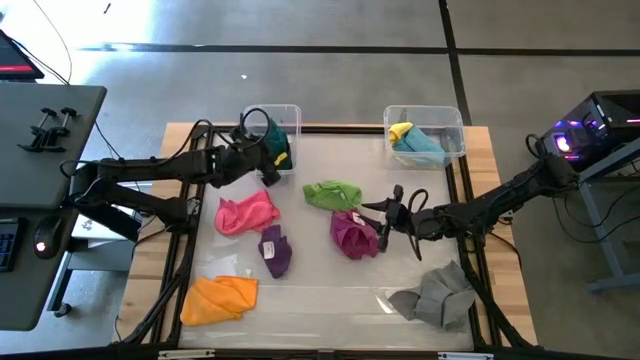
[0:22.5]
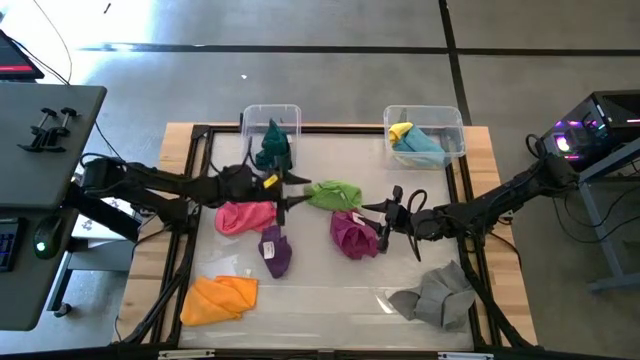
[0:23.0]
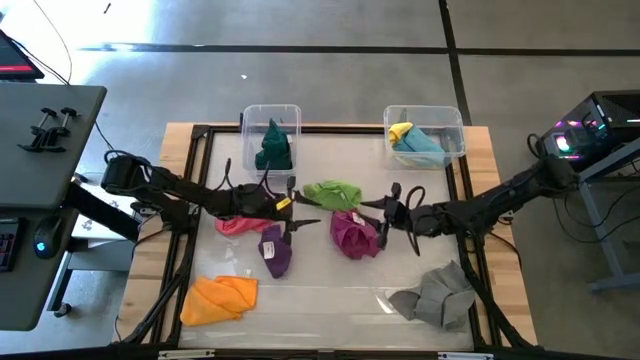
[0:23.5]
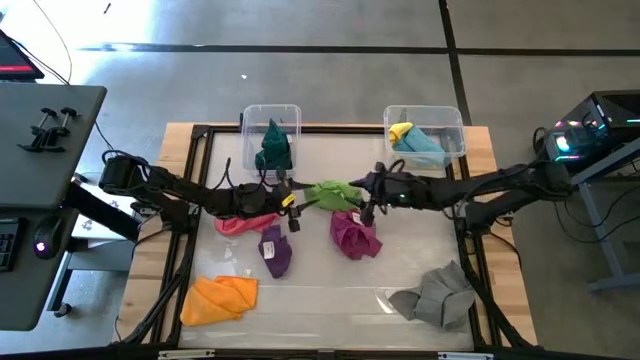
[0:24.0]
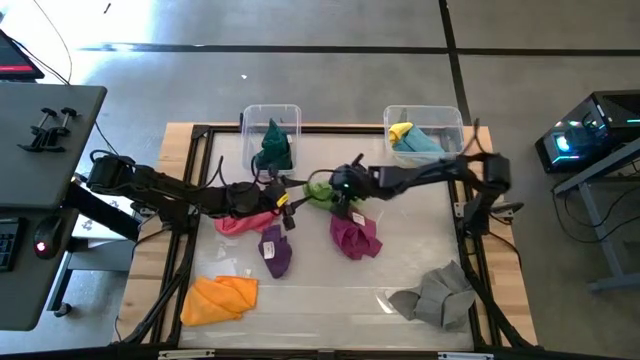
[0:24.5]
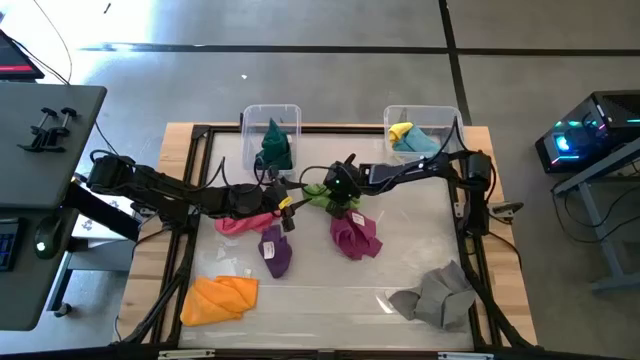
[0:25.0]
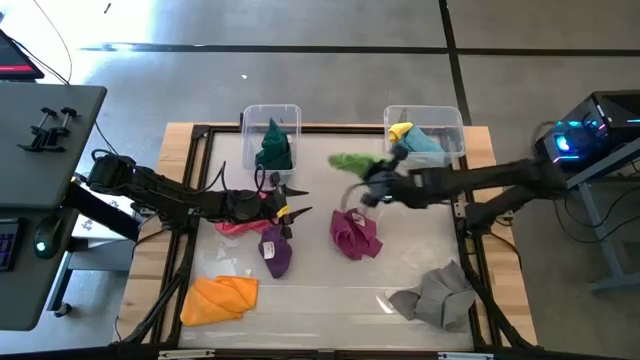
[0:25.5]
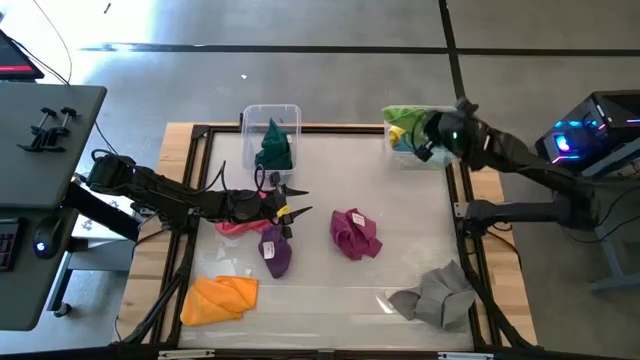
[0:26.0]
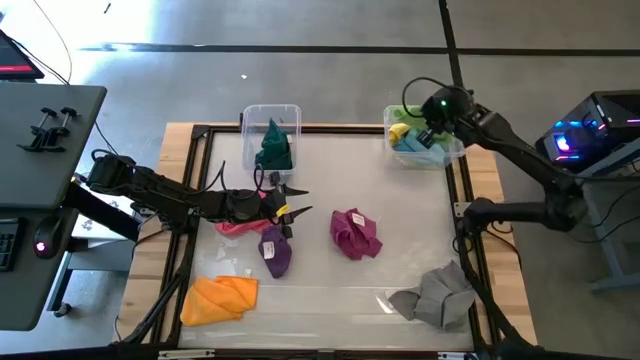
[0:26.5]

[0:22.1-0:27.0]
Task: Sort towels by color in basket
Put the light green towel into the right transparent bin

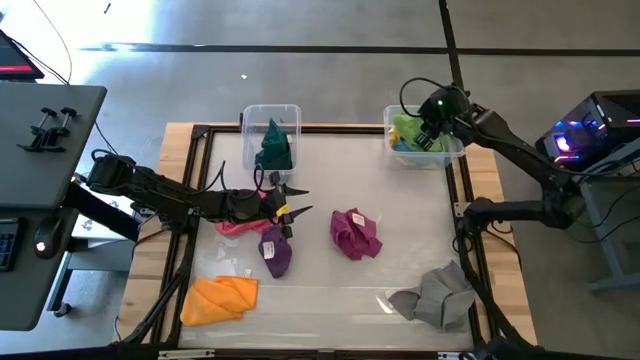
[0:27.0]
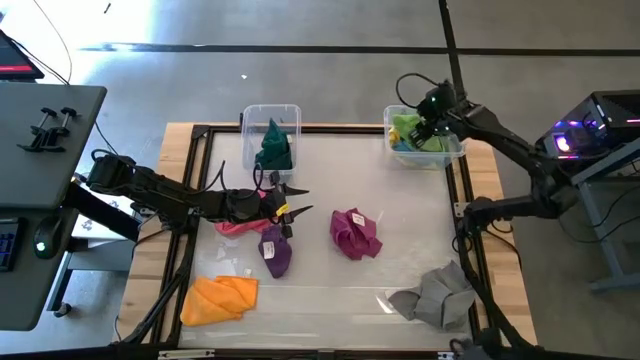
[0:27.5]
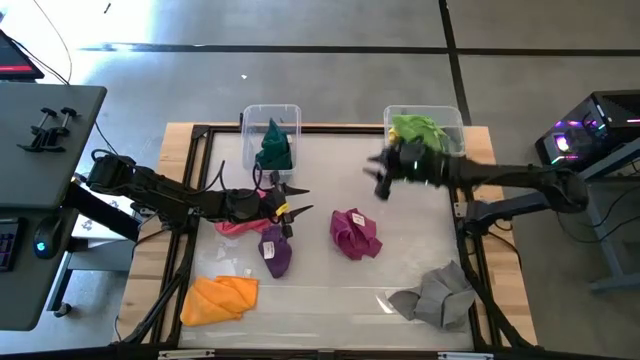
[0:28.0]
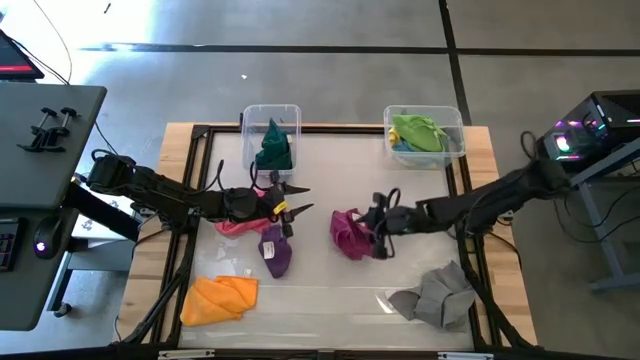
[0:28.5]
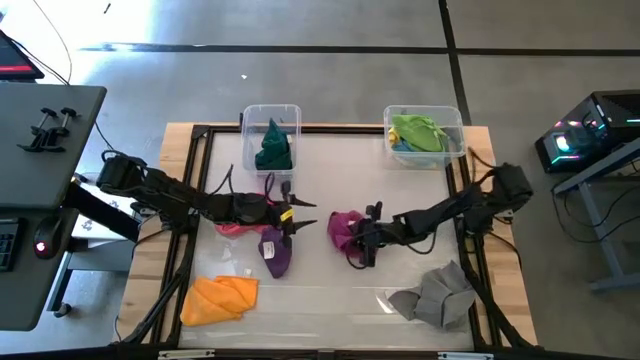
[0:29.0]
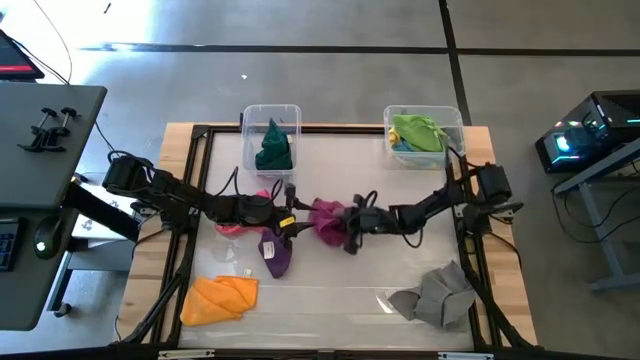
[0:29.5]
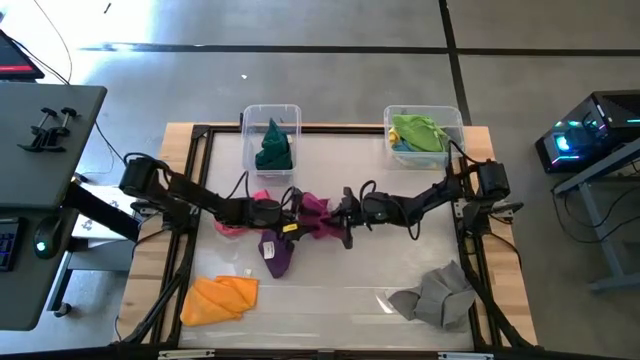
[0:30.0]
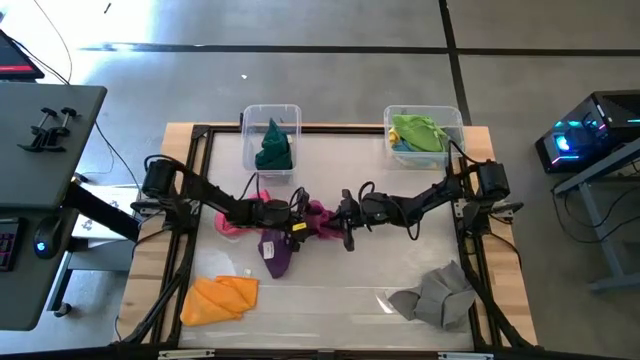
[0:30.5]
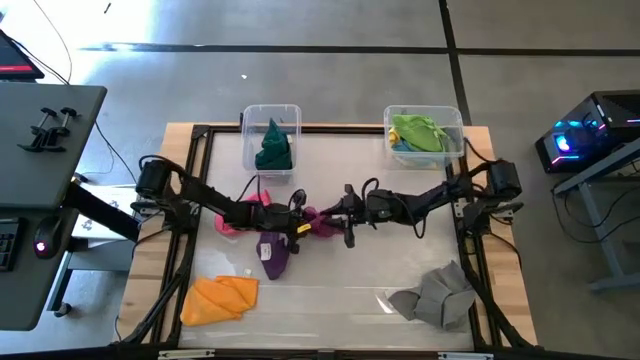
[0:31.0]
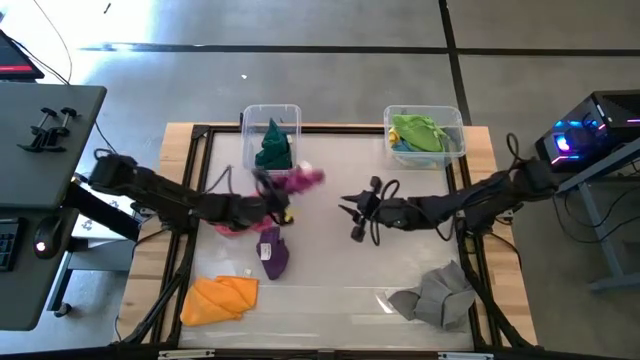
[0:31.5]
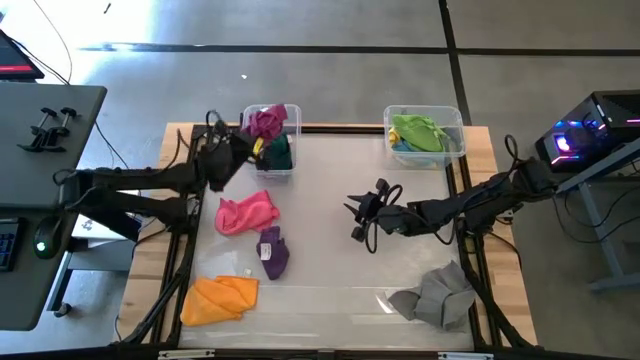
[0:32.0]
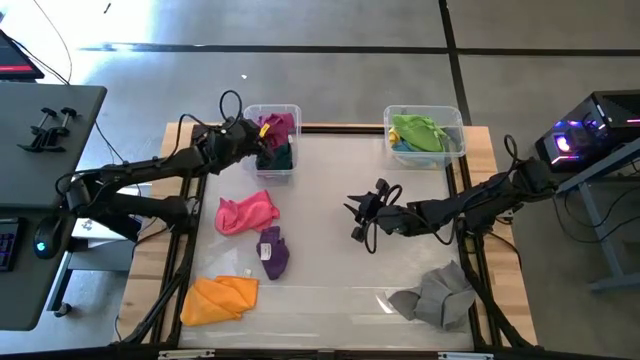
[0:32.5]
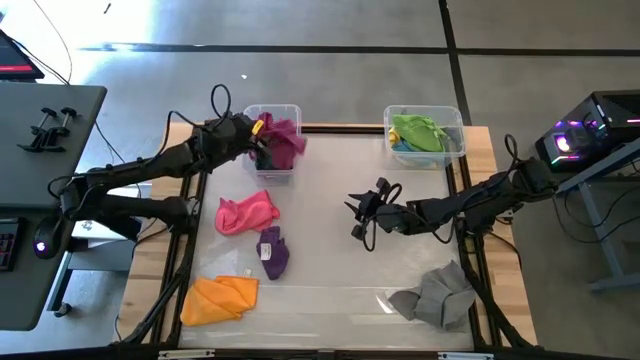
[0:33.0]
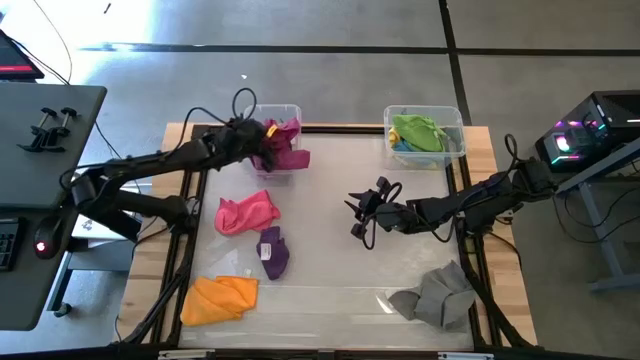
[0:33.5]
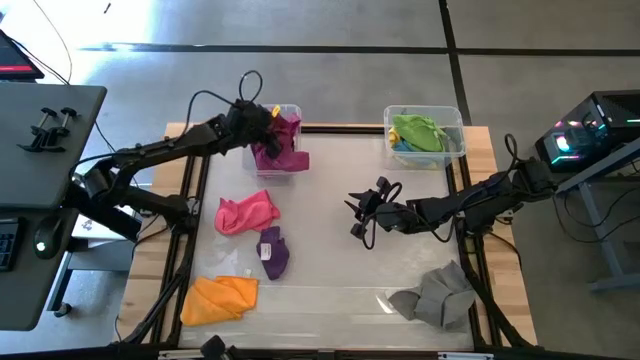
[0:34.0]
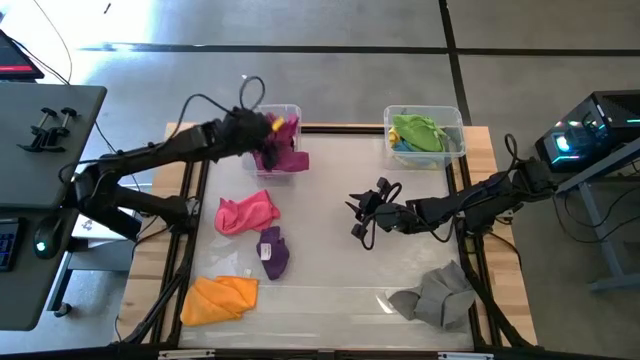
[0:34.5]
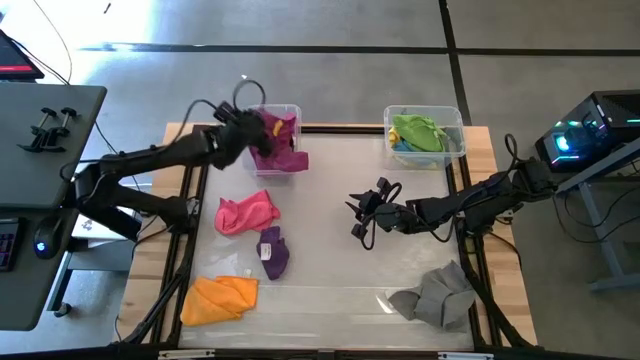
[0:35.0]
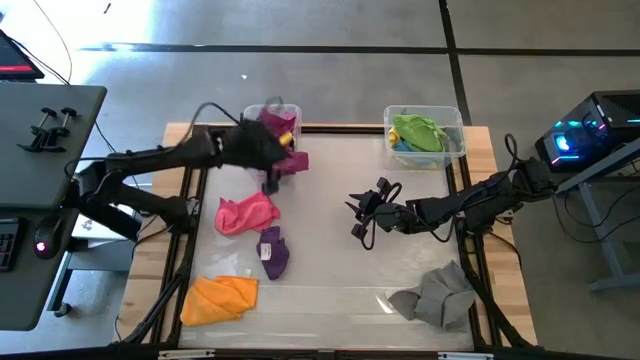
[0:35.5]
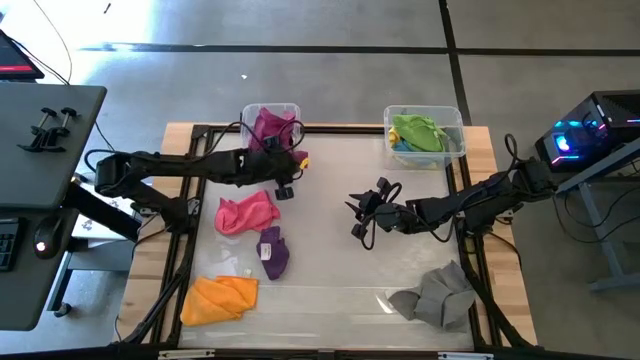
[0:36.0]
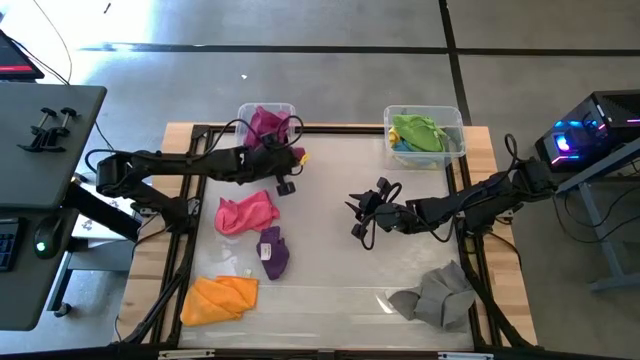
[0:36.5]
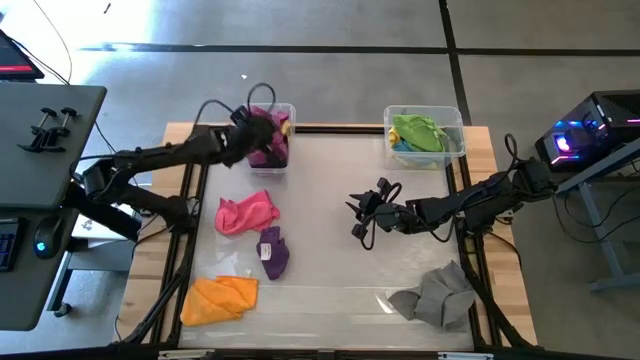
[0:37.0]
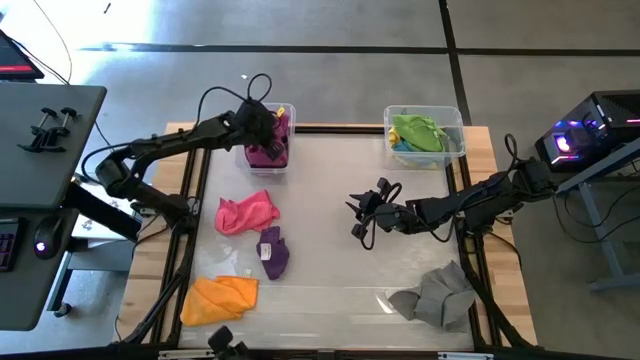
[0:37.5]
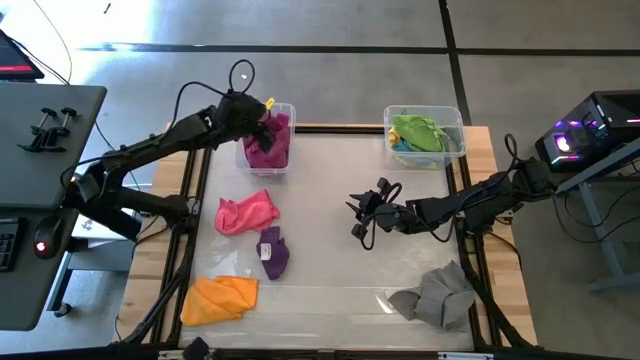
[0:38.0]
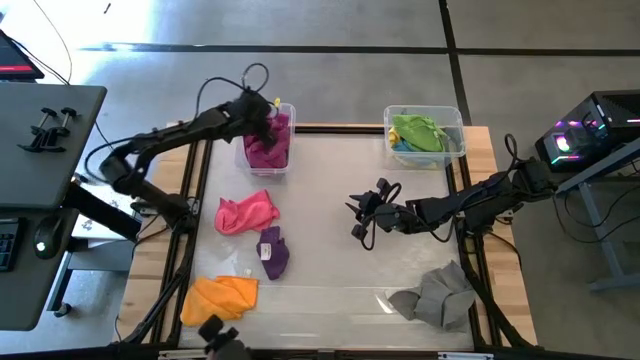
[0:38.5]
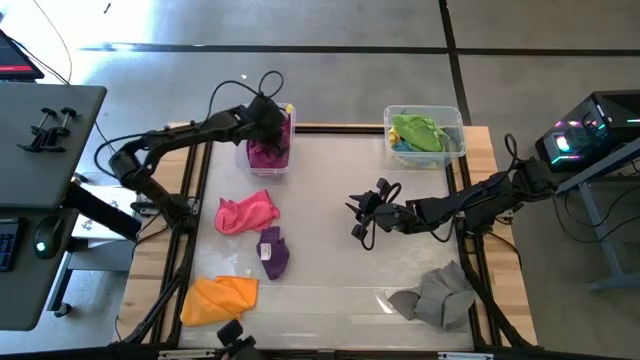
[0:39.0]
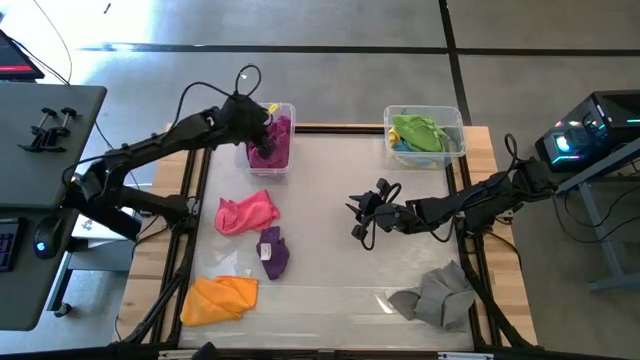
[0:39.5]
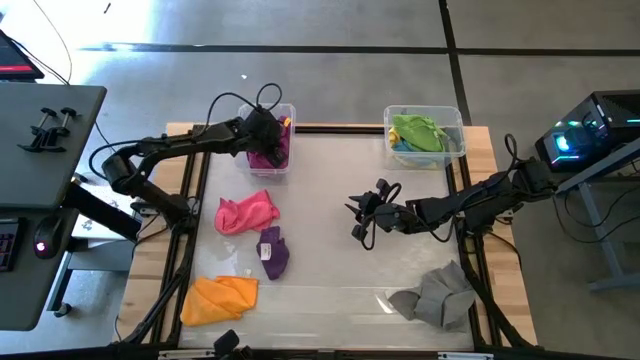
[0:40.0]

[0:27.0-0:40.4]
Put the dark pink towel into the left transparent bin

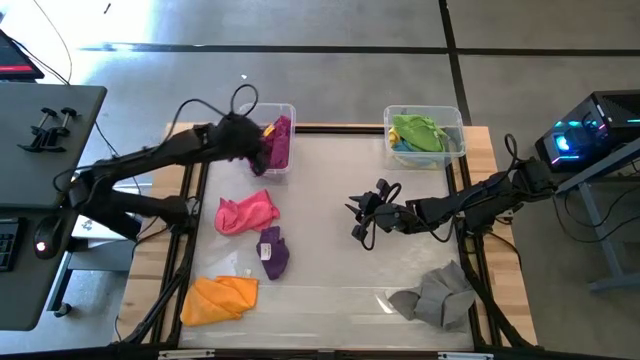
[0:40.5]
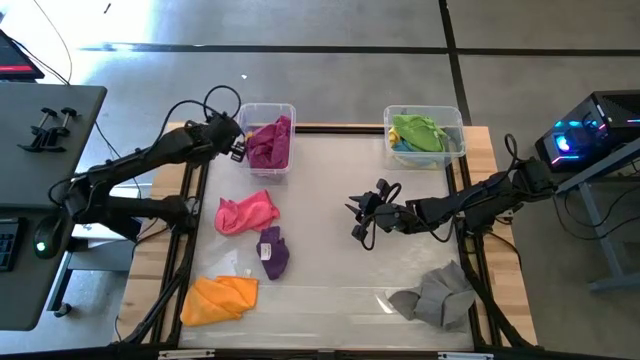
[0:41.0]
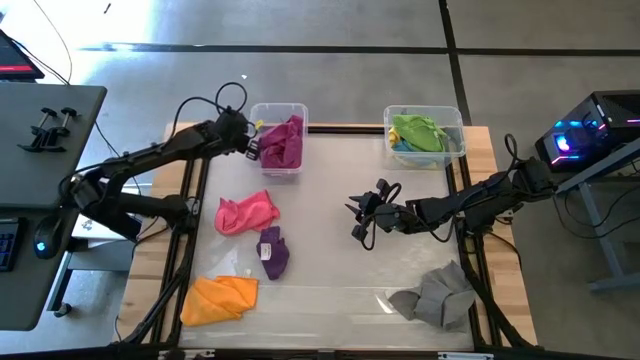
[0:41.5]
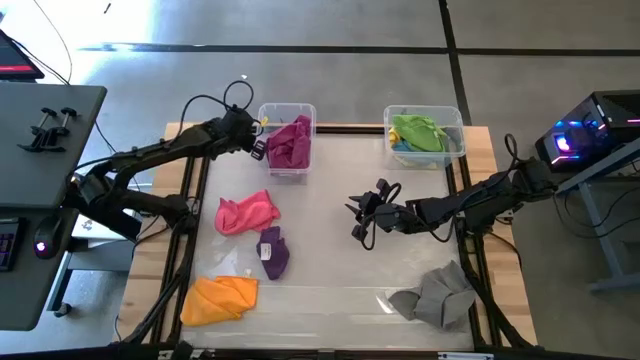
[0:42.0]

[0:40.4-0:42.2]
Adjust the left transparent bin
